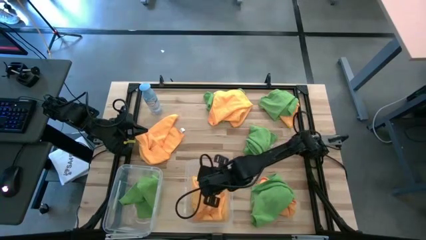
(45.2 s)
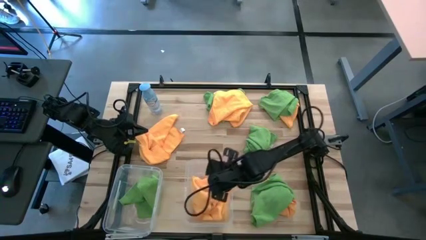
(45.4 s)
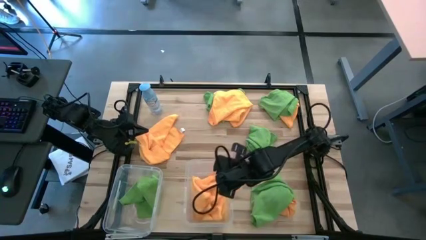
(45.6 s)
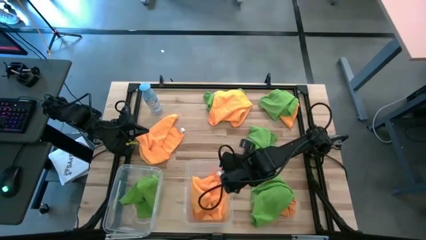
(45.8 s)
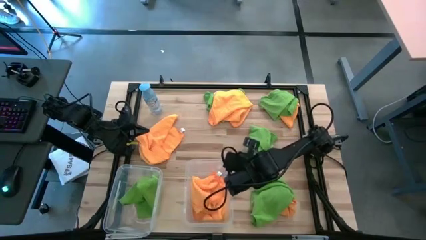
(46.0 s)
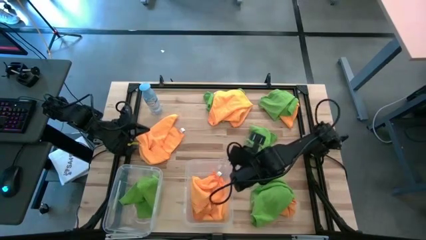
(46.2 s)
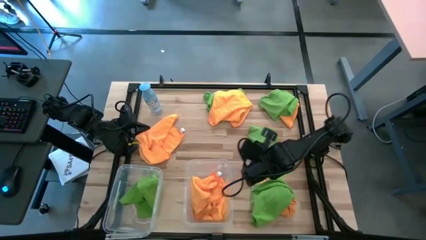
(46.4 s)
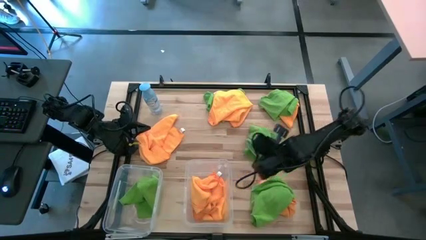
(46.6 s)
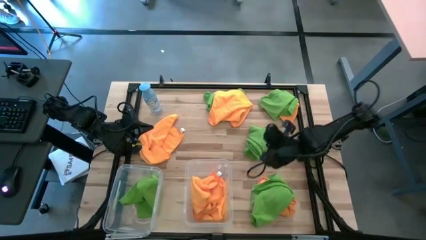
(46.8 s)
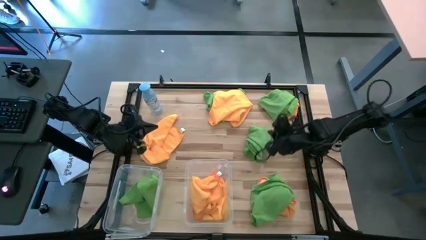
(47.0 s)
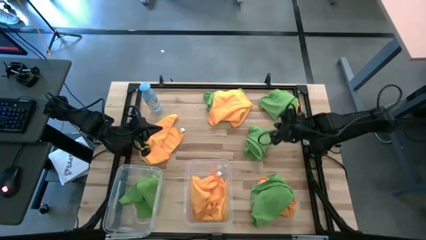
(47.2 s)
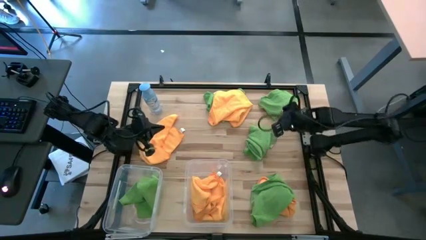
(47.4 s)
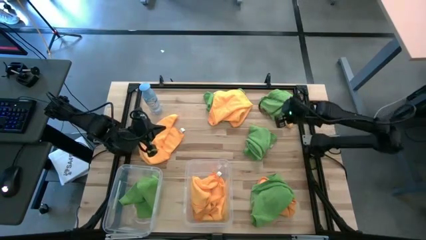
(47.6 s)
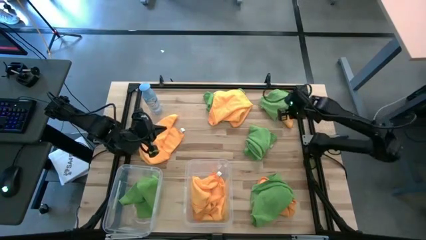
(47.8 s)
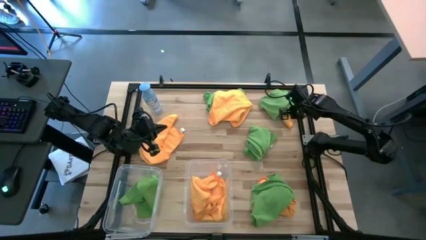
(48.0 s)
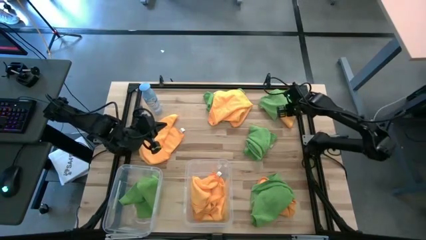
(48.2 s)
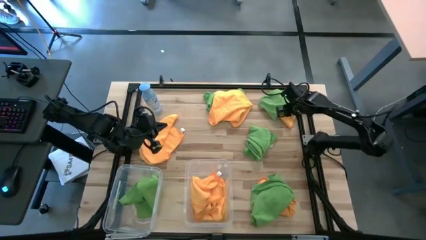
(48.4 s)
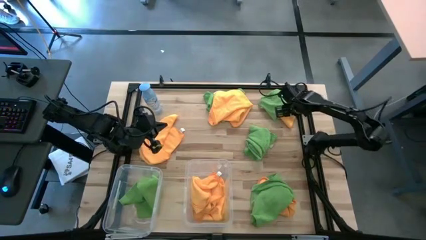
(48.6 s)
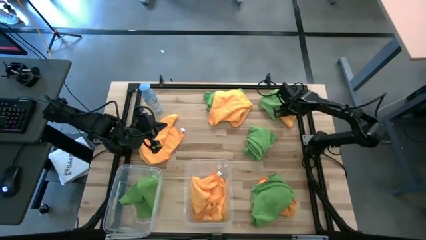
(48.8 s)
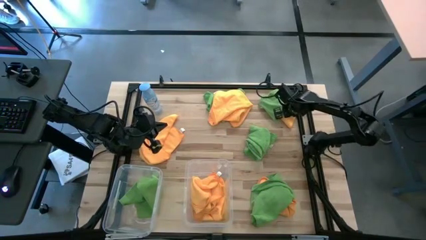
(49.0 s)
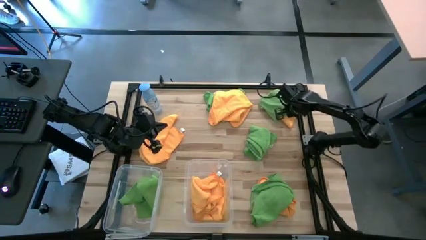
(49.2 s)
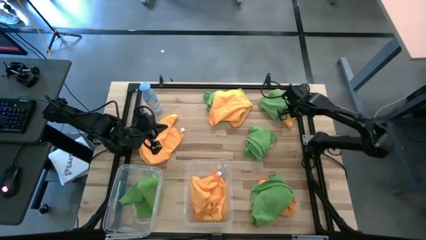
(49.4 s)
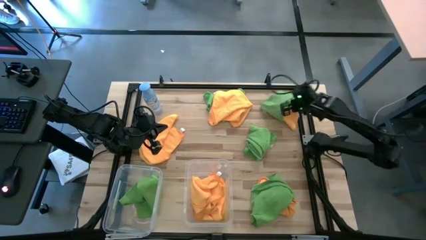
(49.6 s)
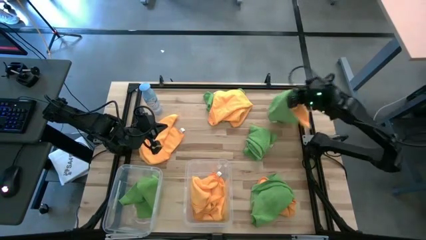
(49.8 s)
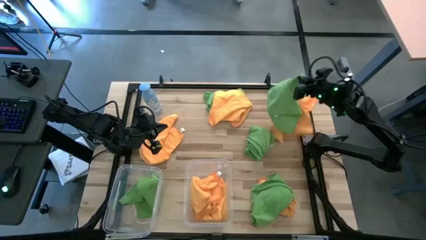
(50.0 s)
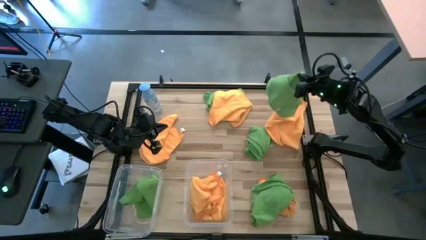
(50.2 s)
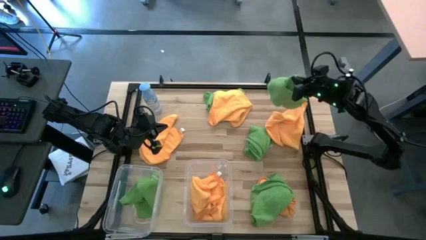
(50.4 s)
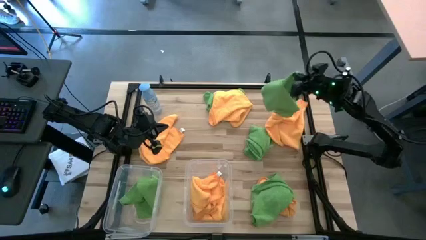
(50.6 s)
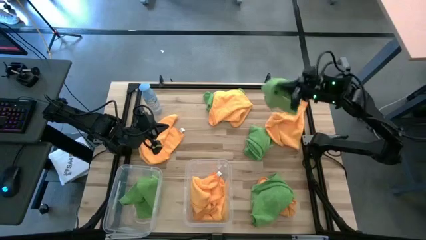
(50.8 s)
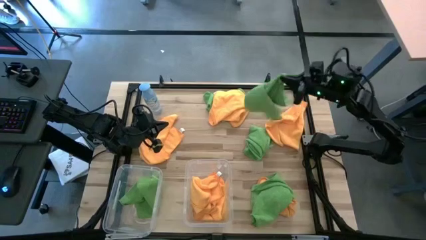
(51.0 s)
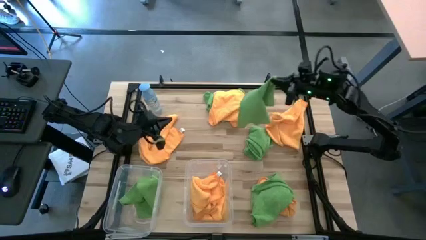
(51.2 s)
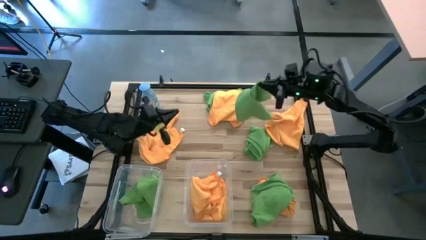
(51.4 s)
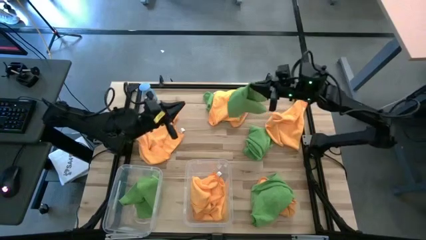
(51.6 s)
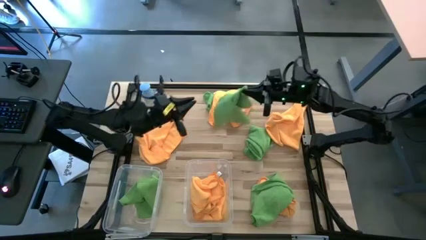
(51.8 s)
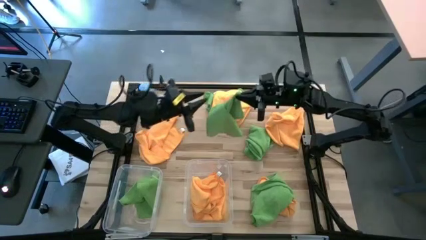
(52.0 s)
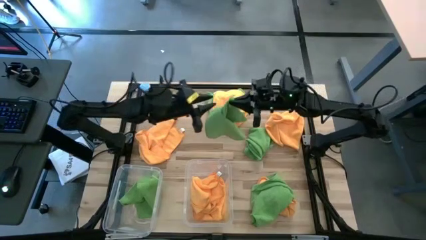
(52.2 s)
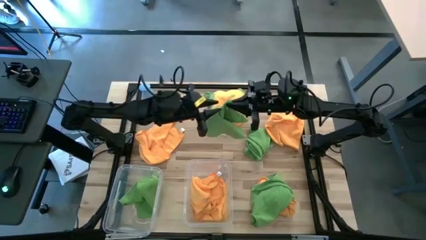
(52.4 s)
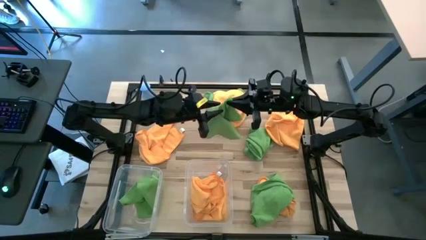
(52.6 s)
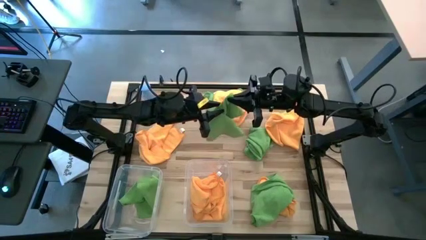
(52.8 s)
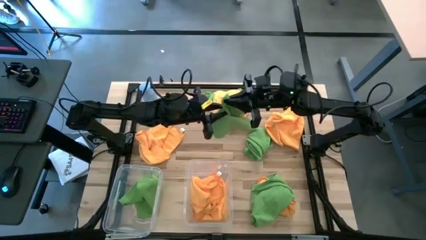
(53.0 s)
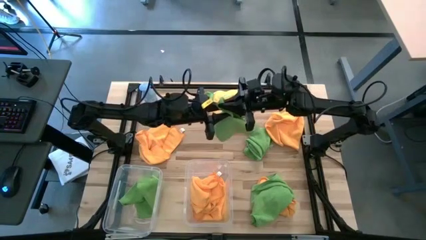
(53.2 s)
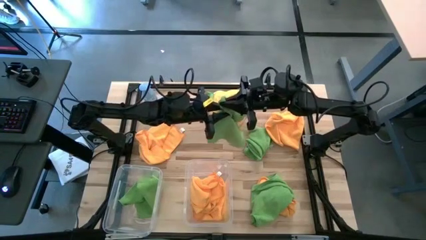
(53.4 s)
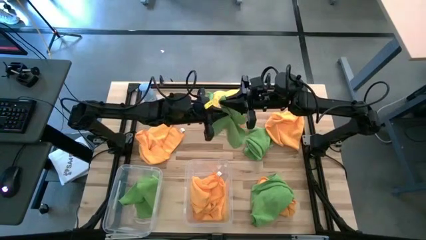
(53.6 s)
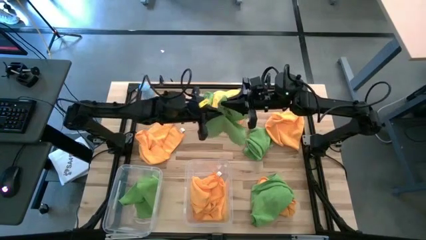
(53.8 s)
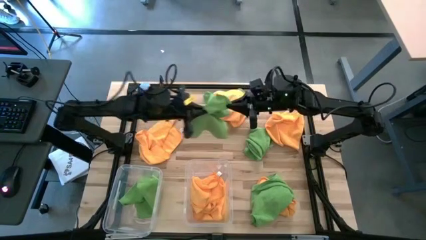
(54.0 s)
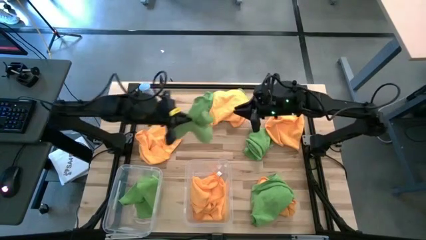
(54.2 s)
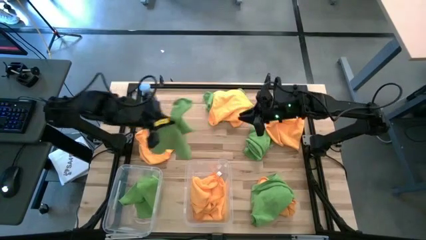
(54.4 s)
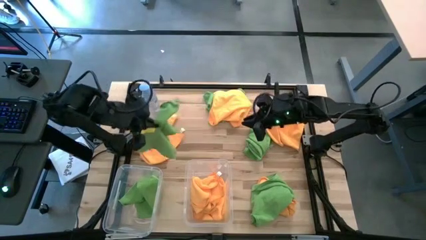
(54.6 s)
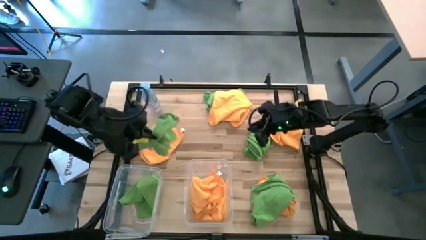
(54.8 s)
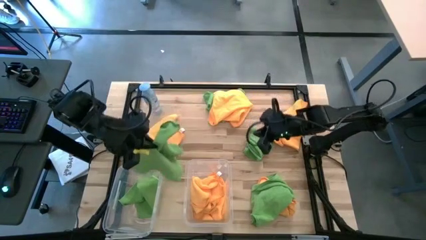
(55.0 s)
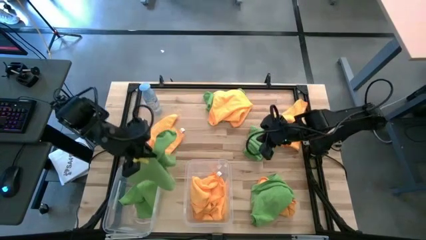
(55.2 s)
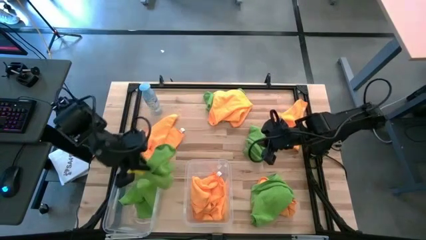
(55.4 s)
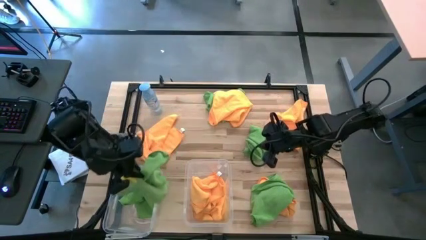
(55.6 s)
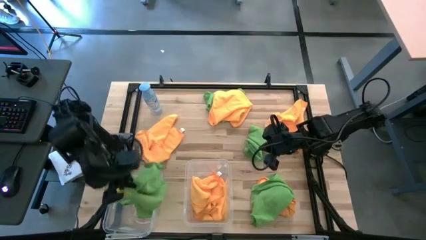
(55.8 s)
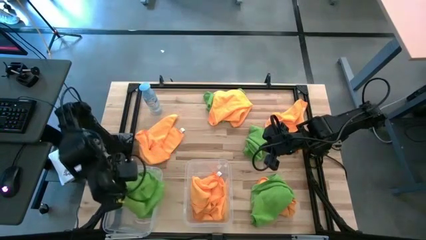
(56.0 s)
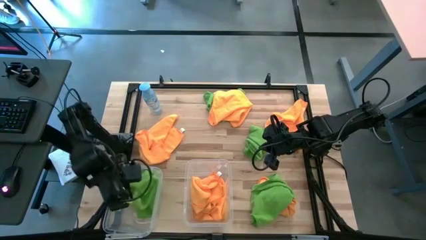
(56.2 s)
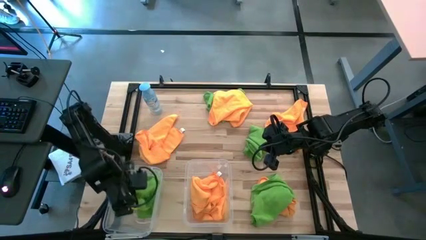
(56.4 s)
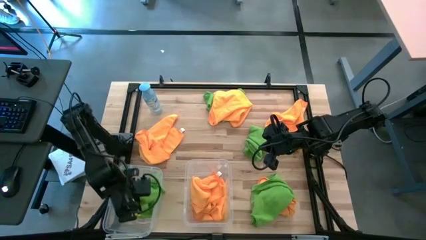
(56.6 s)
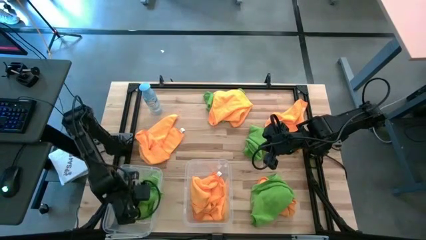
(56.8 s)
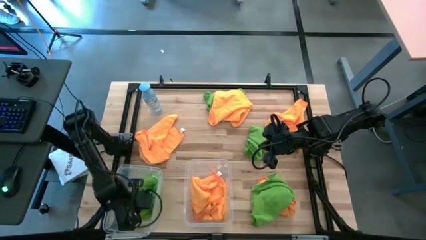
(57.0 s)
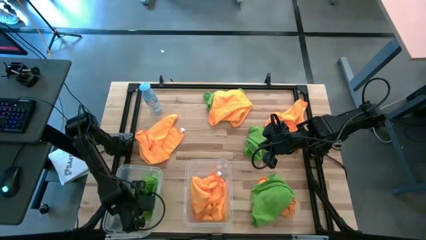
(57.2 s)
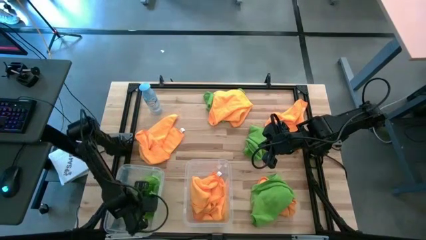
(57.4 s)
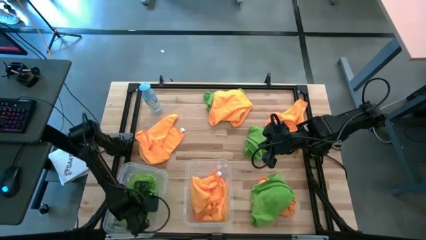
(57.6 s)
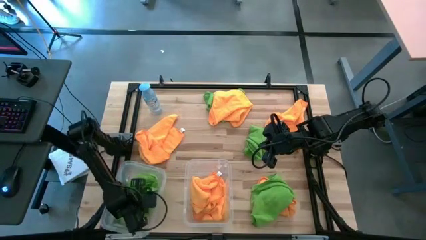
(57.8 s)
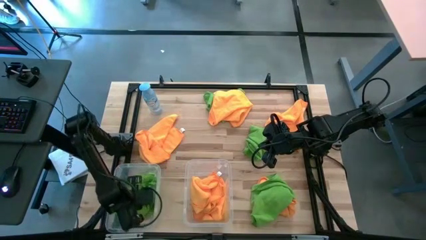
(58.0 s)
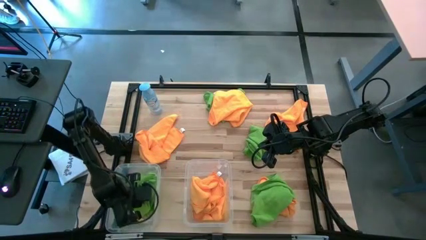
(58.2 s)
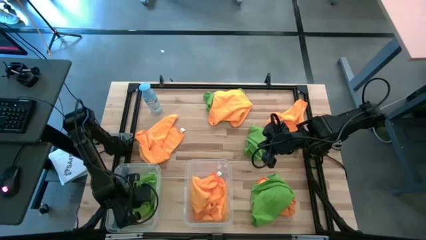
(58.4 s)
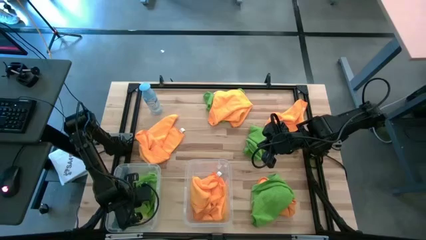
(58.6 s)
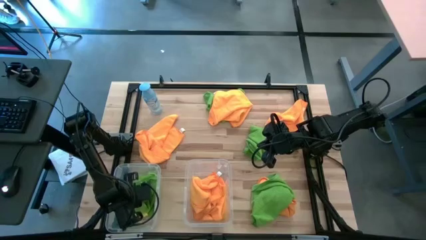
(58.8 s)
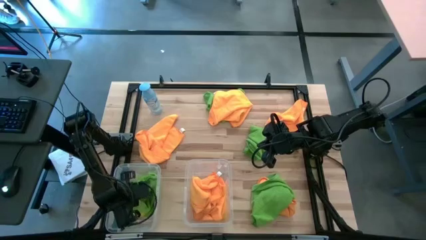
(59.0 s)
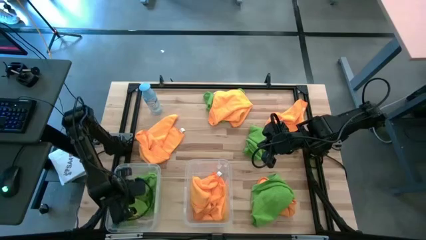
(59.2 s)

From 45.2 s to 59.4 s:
Task: Sort microfiber towel by color & place in baskets
Put the green towel into the left transparent bin

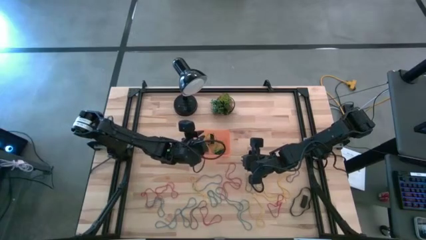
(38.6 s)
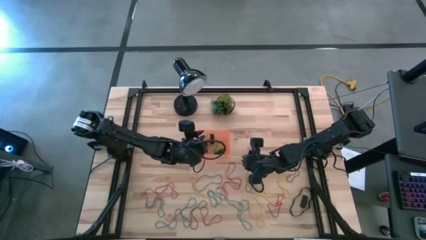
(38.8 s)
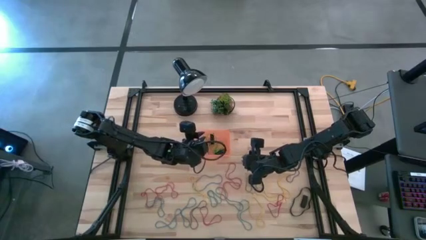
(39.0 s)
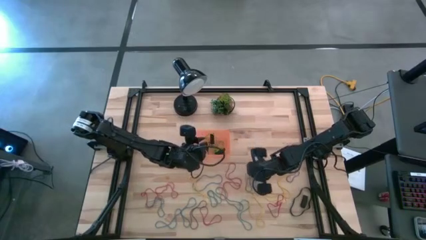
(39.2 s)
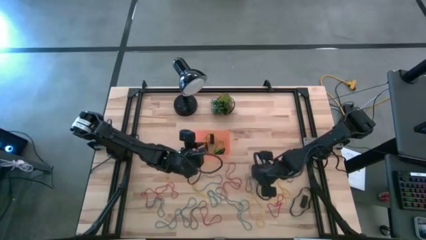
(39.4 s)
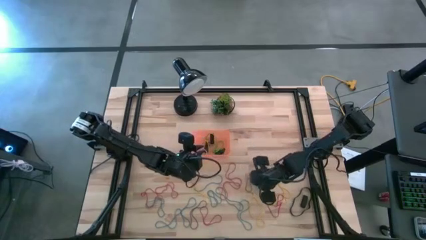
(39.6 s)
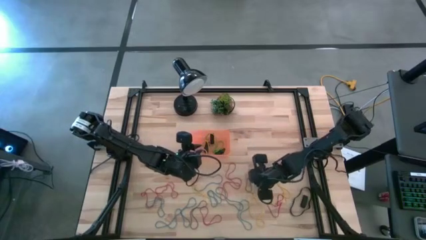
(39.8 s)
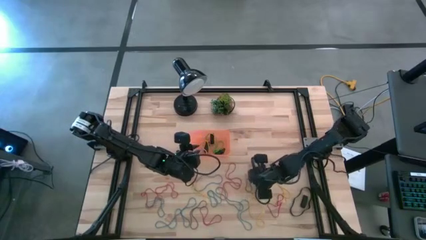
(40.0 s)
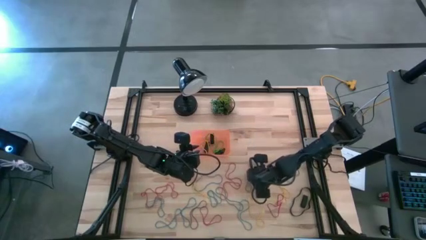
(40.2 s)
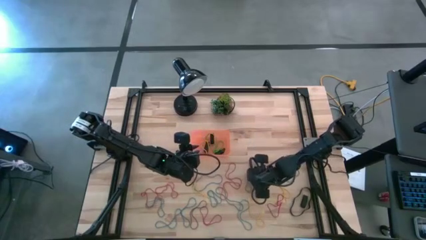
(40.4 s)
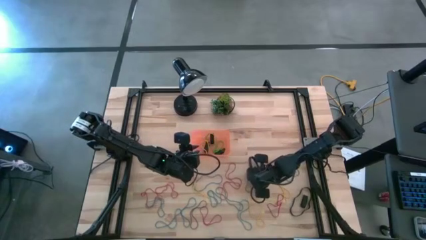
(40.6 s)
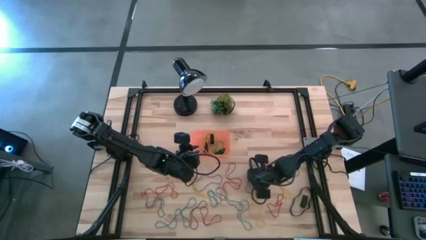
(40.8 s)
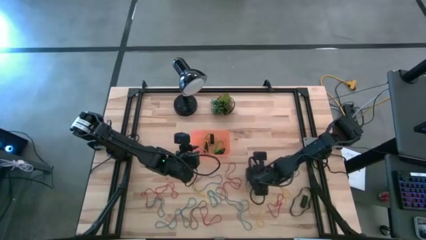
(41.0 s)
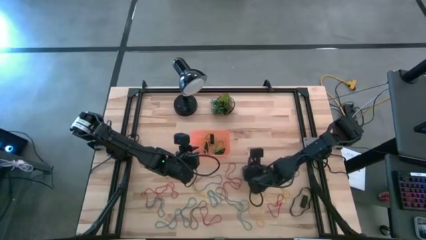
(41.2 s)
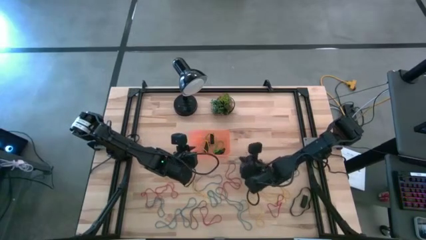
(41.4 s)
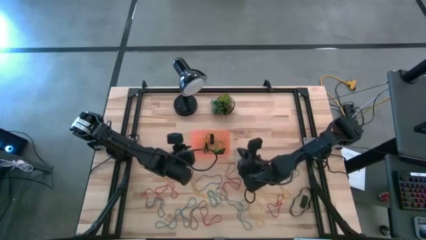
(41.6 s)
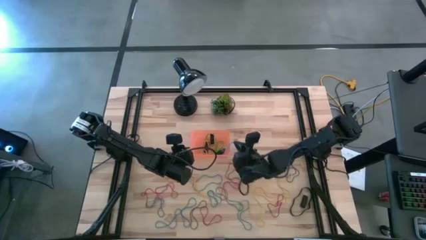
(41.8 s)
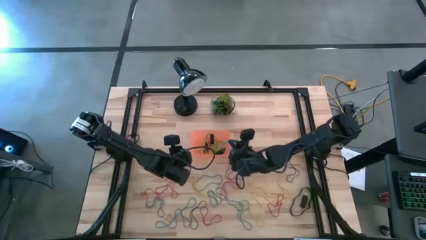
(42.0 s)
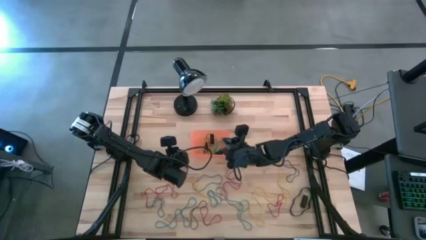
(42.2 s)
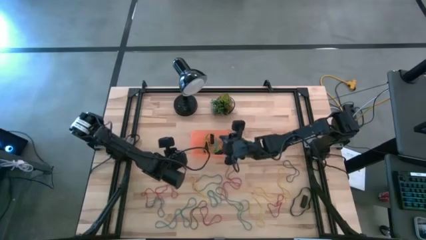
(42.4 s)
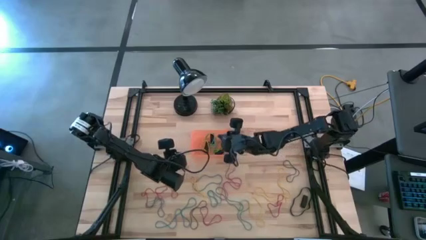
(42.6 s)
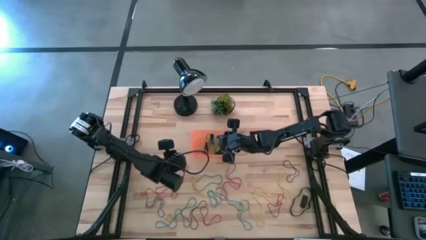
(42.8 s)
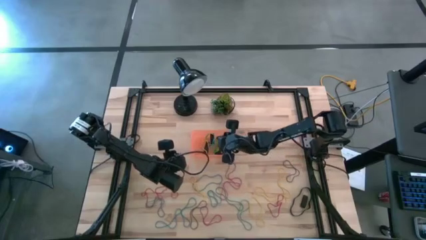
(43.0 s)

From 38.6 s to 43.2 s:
Task: Pick and place rubber bands into bin
Put the blue rubberband into the orange bin
